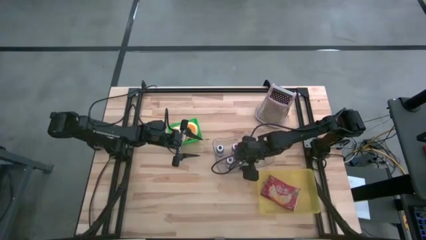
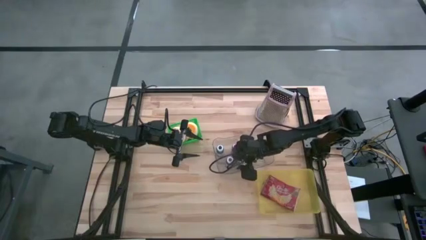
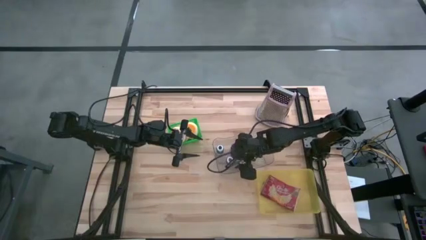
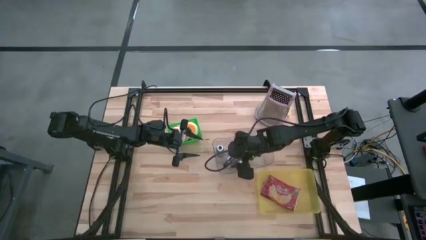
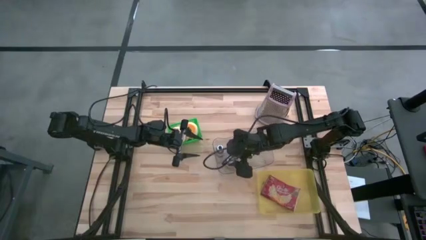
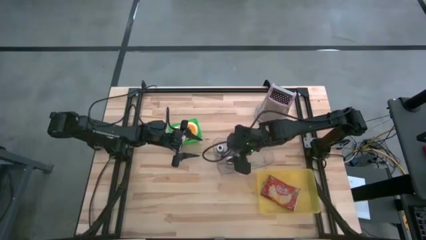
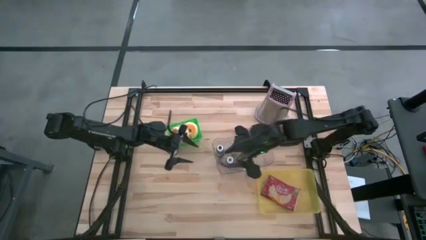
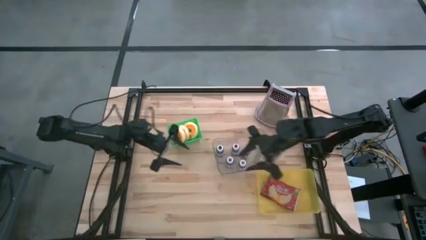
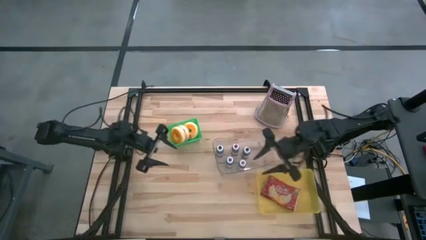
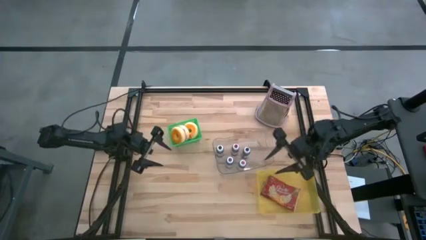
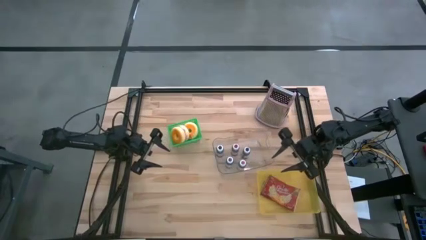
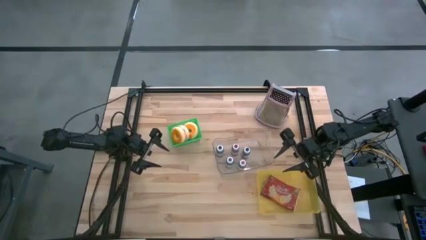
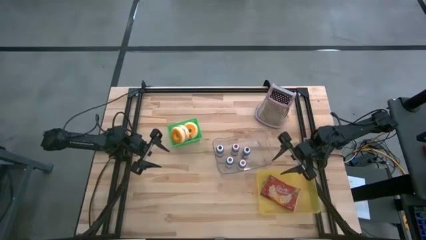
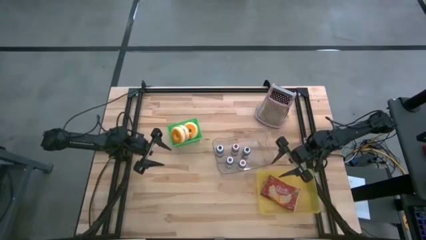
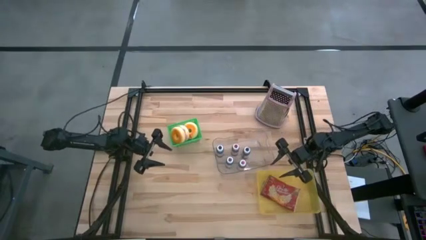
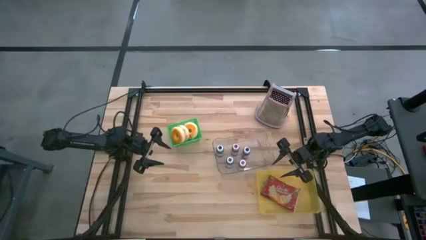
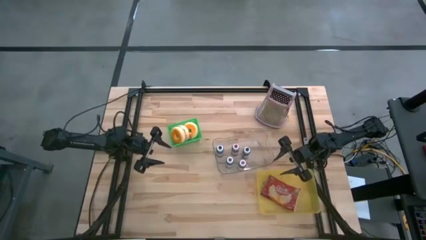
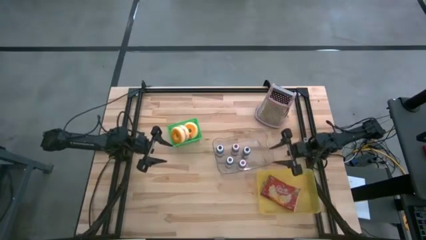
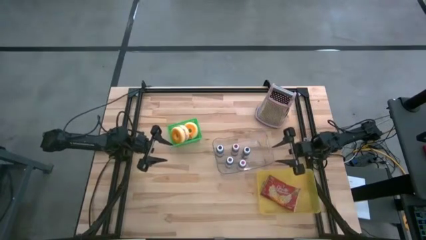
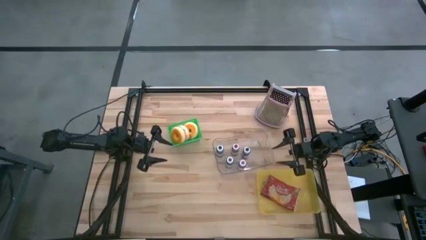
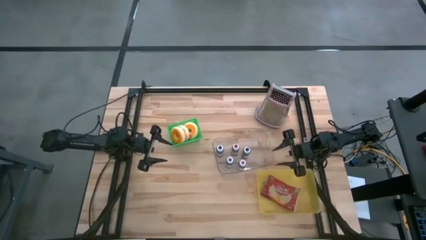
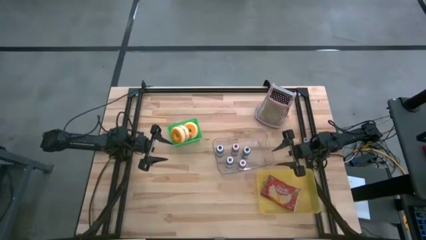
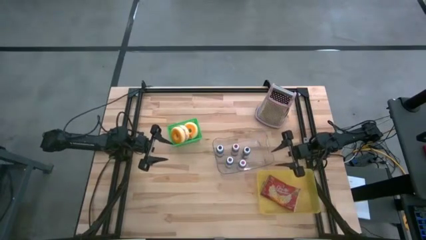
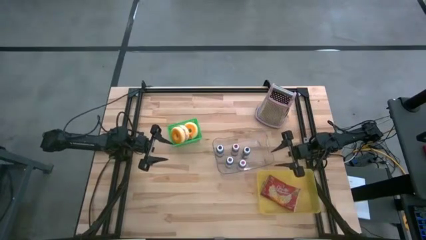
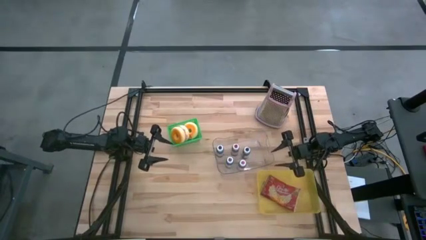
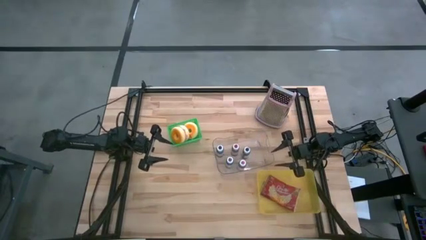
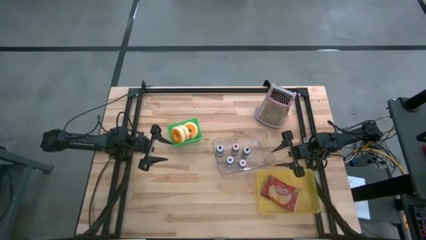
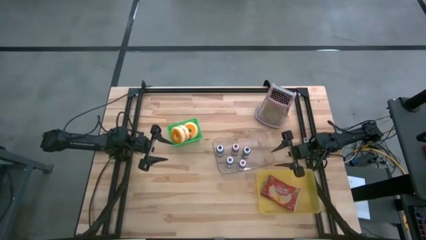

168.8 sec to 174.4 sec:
Task: Pick & Place Food Item
Return to Home Position

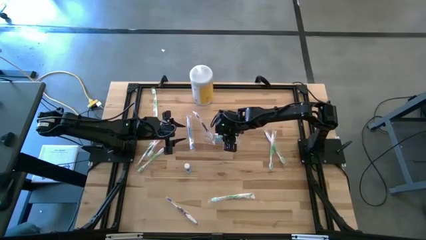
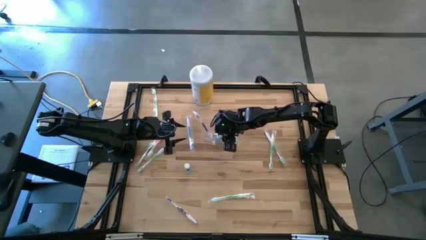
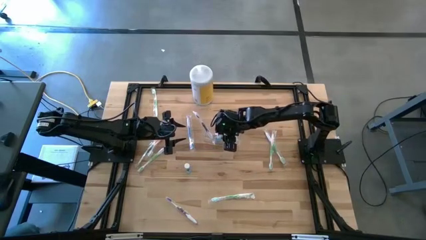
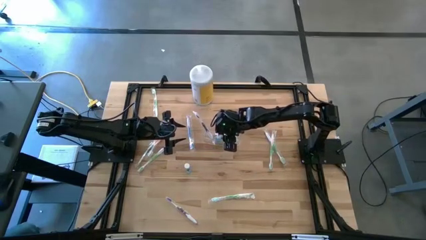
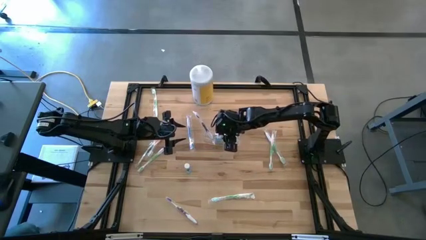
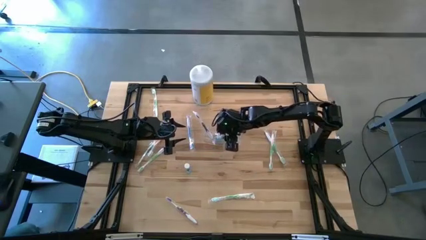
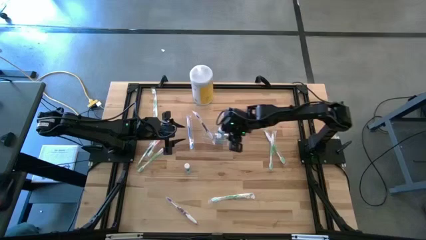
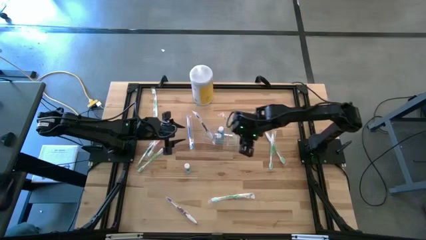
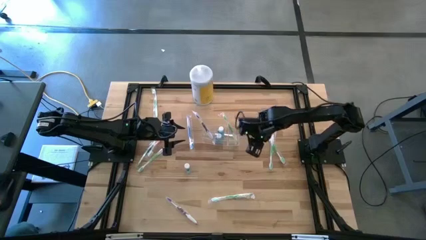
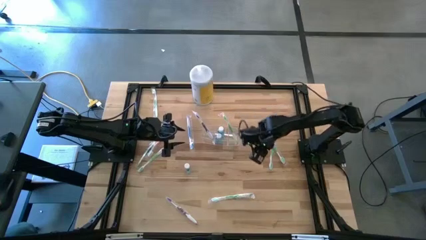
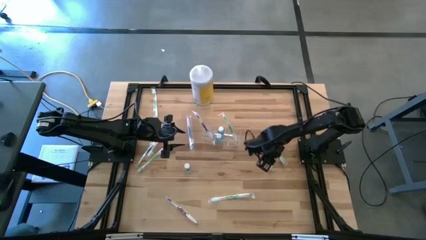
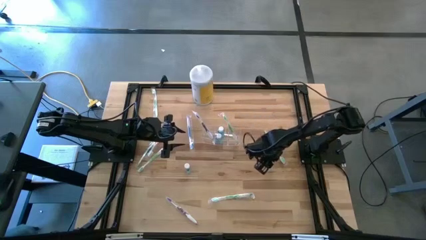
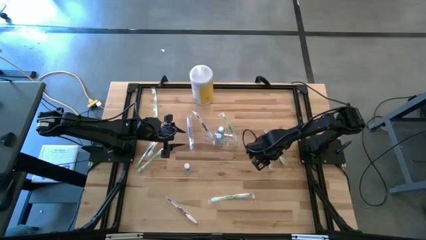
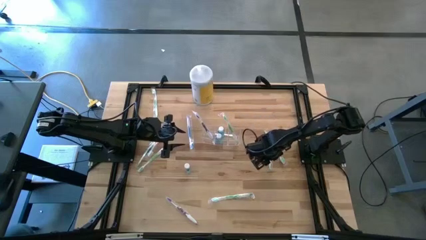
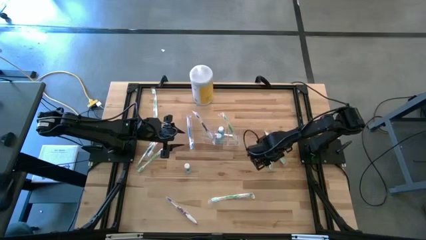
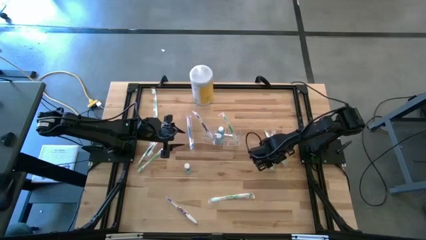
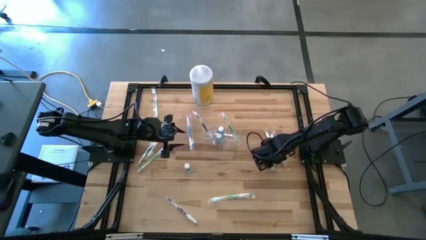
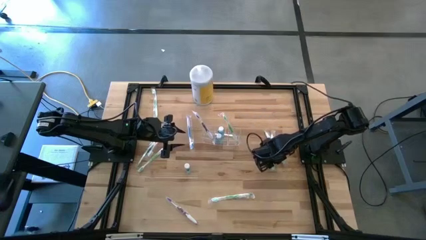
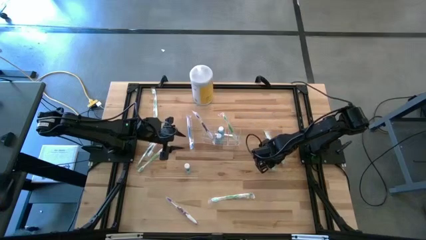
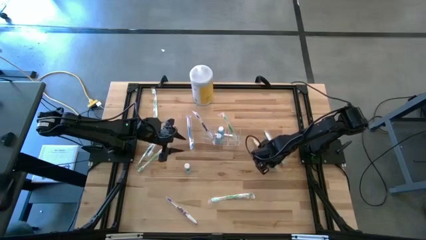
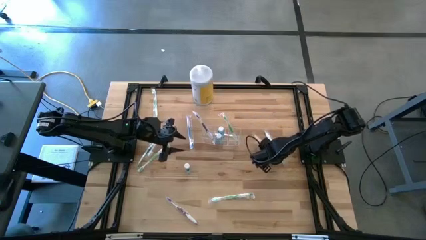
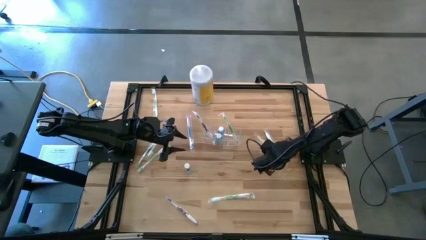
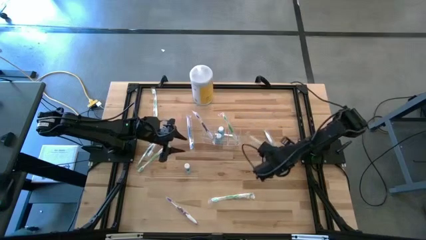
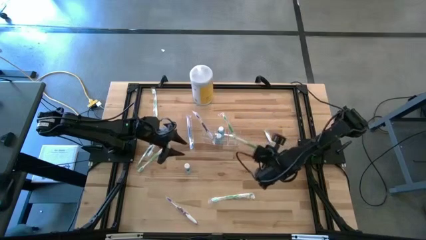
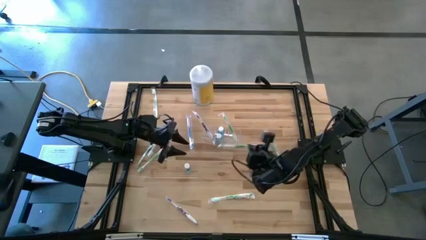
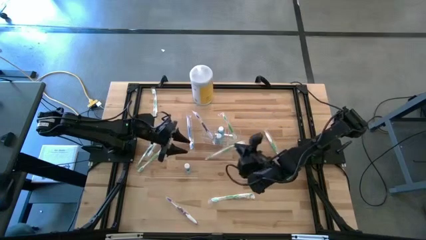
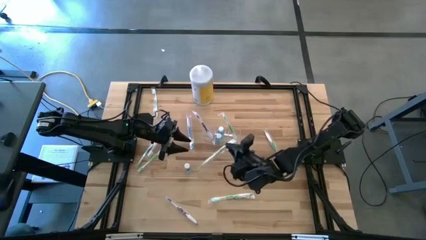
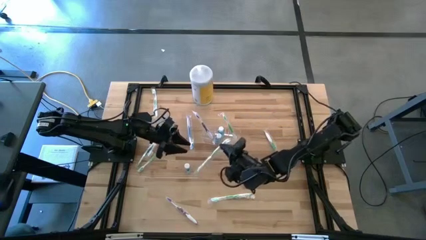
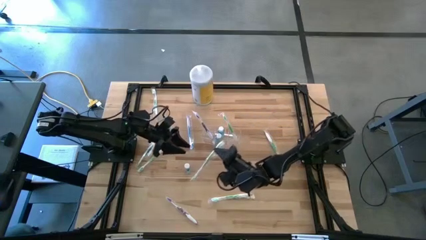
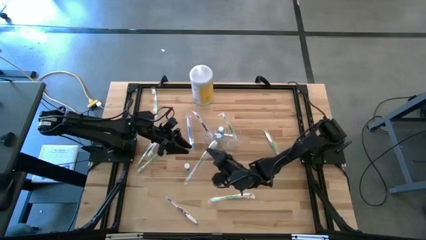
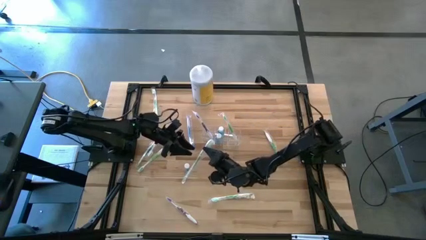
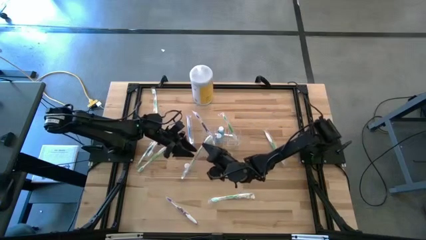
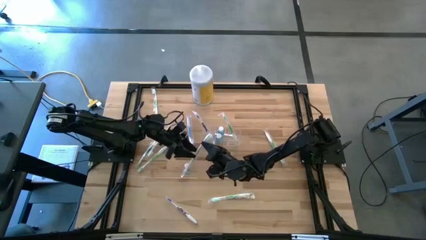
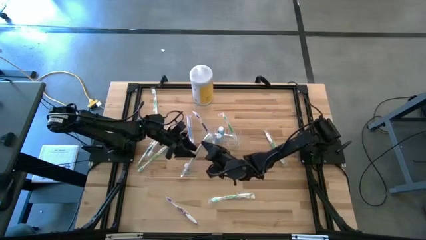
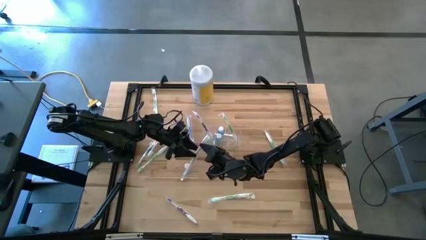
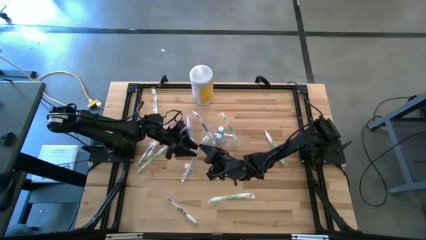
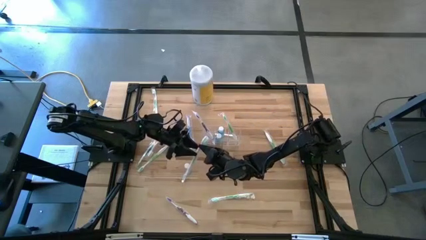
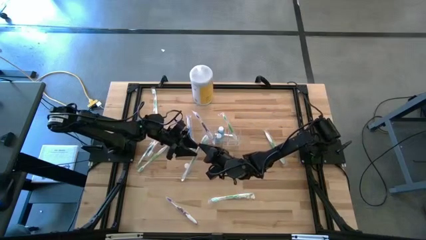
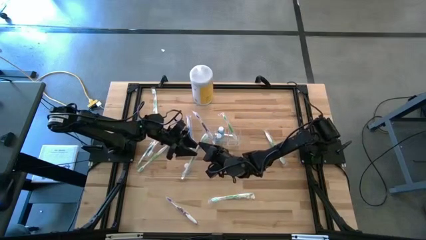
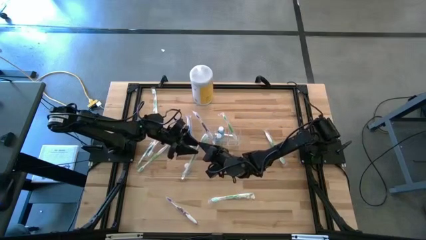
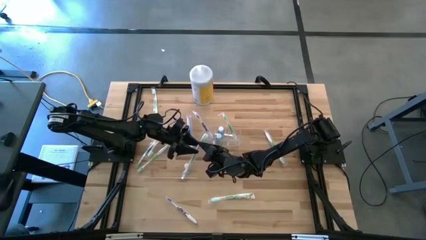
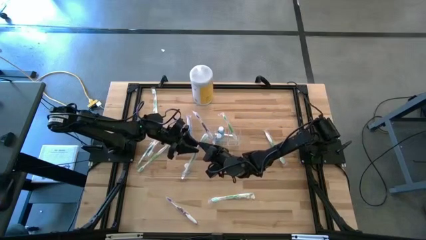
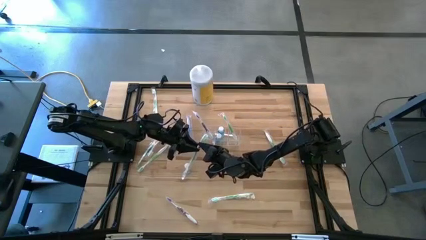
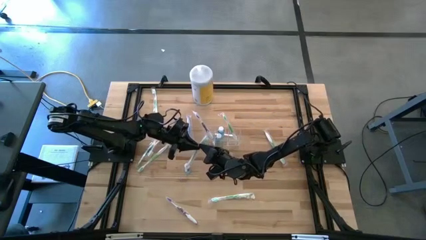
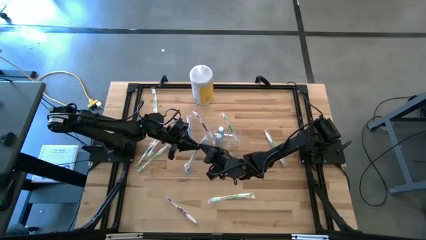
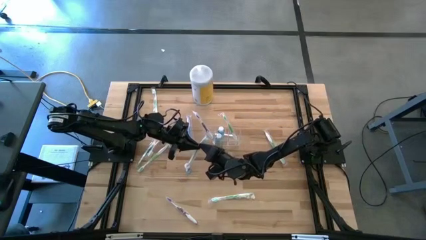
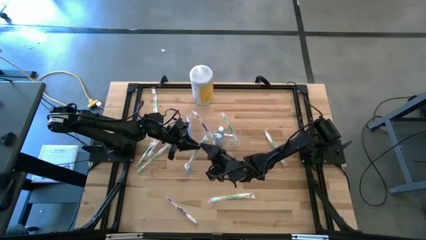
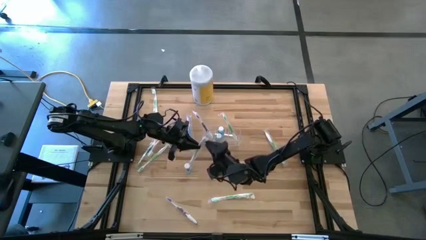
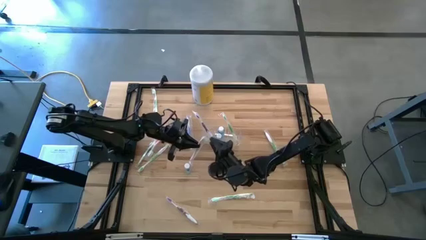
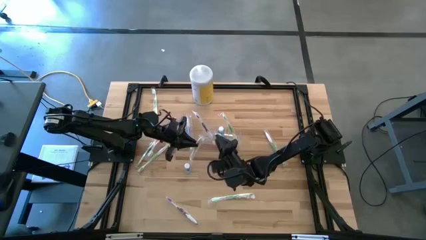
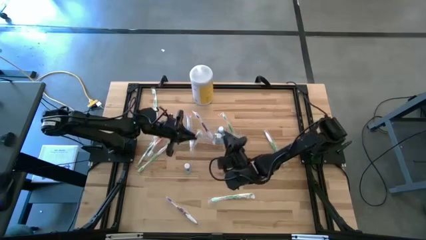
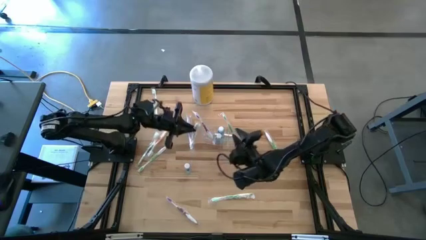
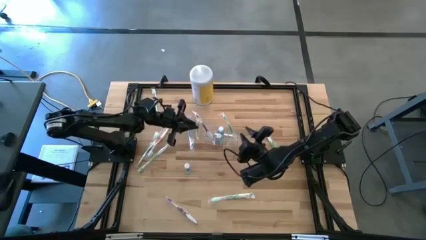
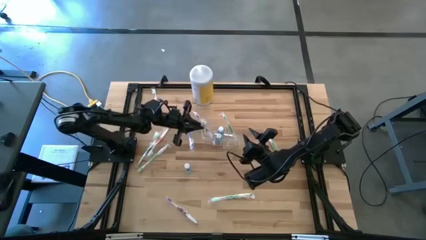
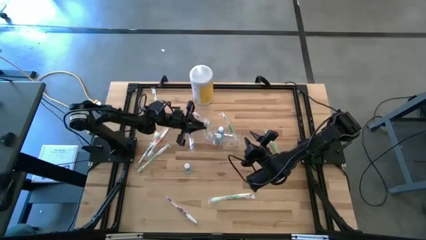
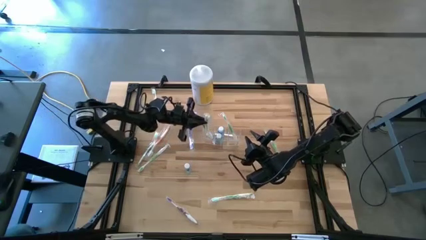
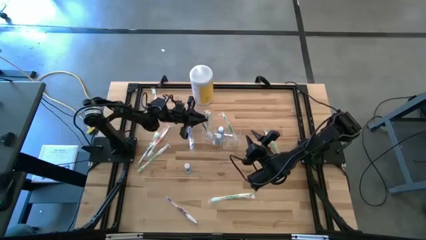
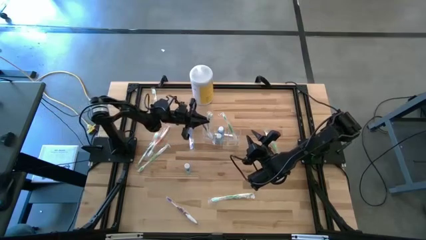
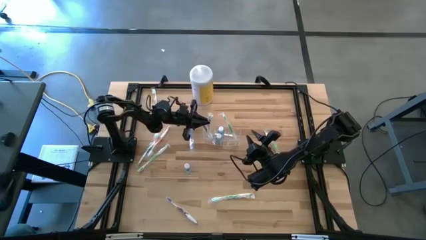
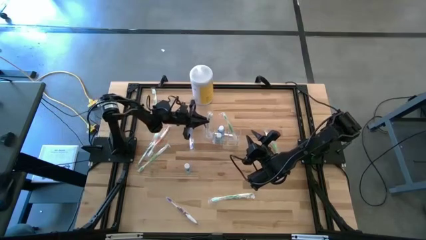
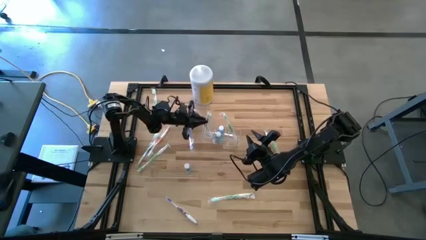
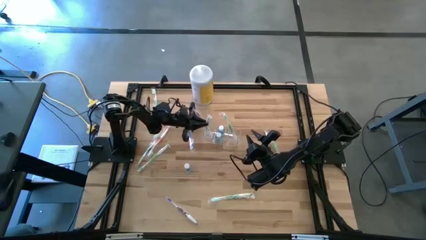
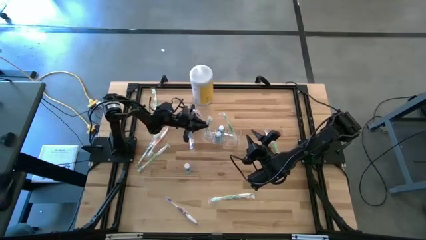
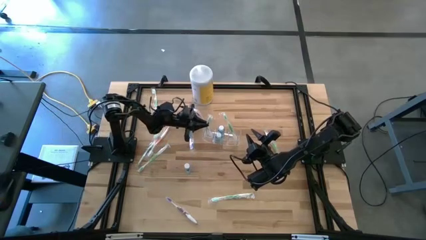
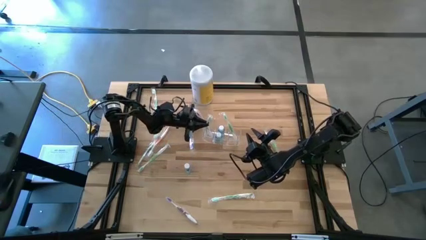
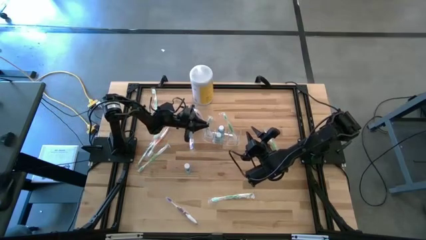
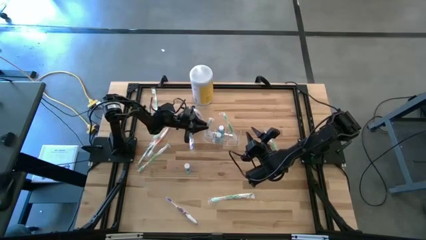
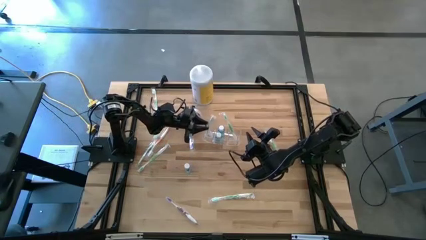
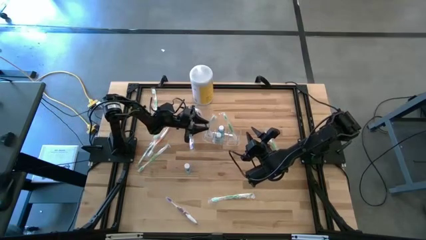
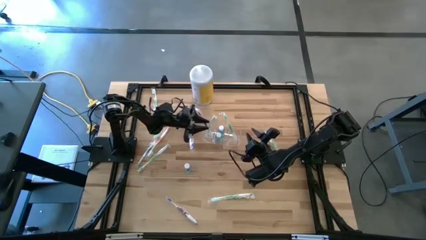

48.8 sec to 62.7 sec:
Task: Pick & Place toothbrushing station
Put the green toothbrush into the left section of the transparent organizer
